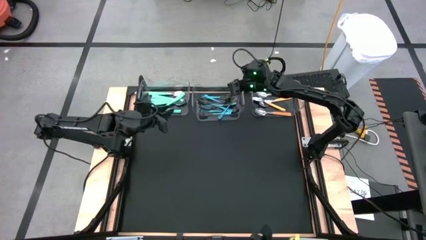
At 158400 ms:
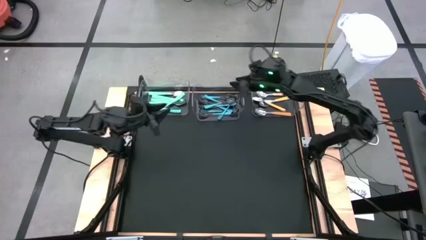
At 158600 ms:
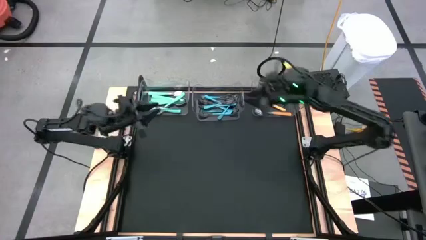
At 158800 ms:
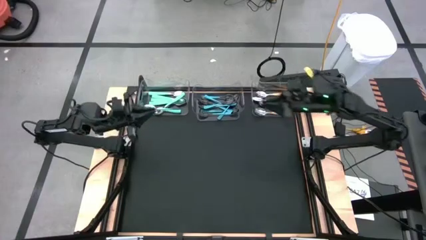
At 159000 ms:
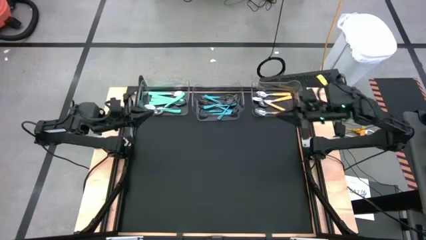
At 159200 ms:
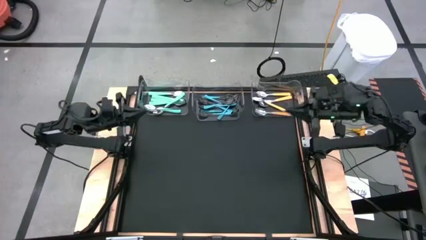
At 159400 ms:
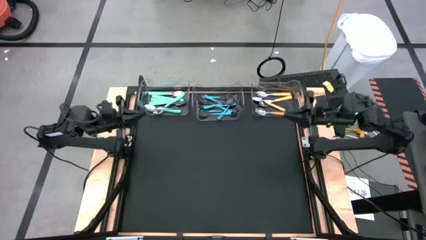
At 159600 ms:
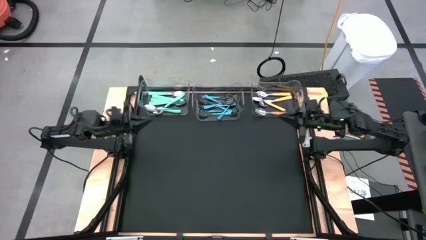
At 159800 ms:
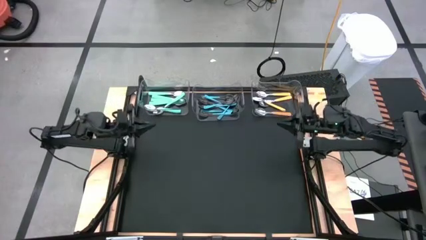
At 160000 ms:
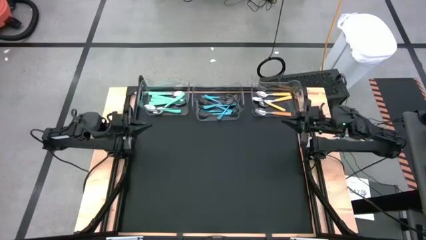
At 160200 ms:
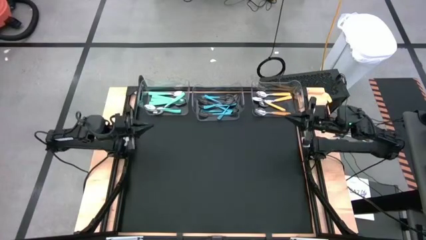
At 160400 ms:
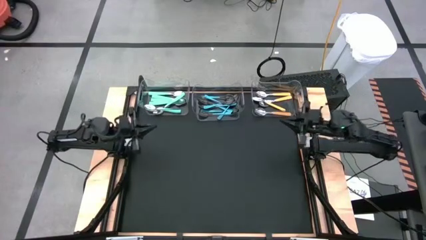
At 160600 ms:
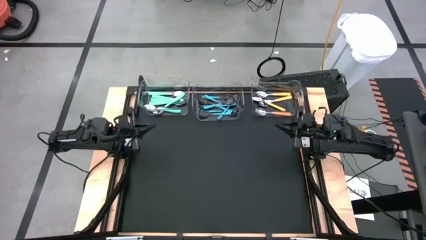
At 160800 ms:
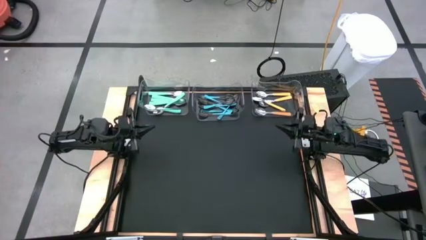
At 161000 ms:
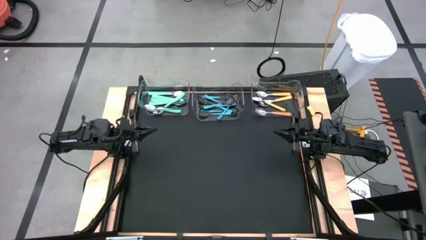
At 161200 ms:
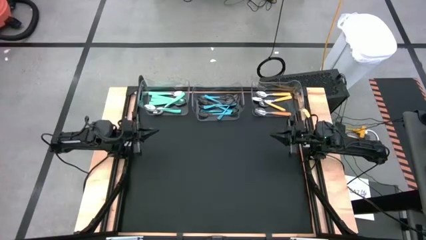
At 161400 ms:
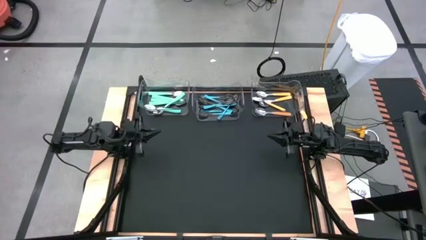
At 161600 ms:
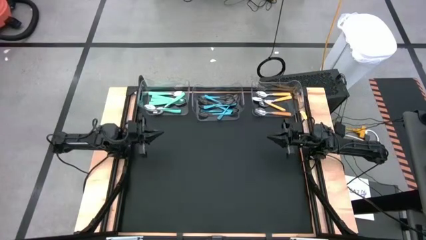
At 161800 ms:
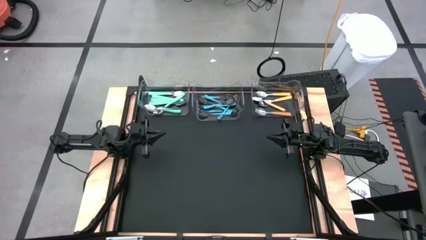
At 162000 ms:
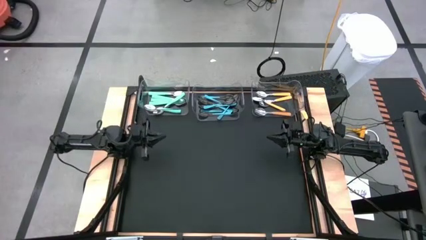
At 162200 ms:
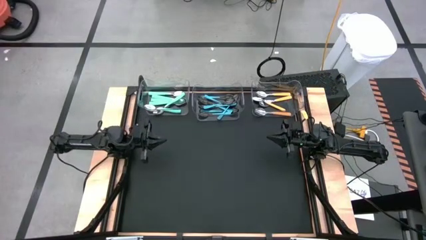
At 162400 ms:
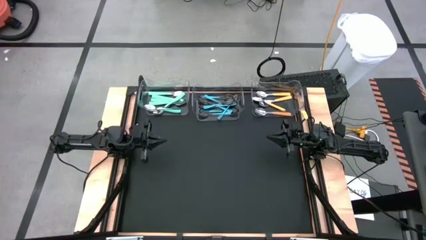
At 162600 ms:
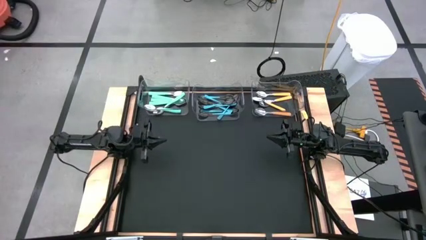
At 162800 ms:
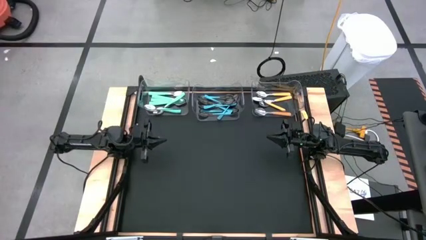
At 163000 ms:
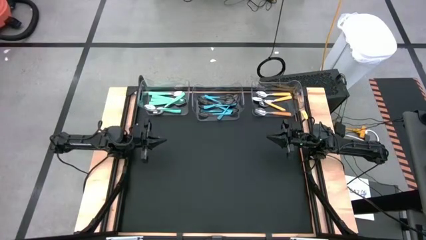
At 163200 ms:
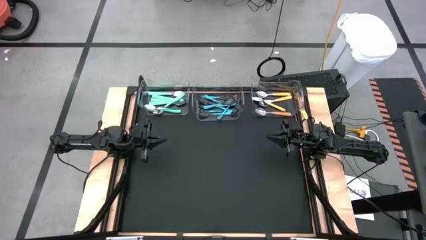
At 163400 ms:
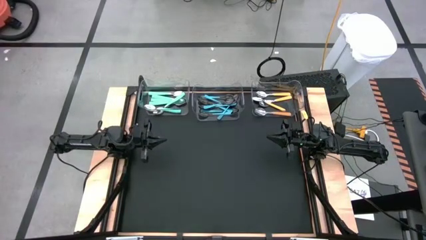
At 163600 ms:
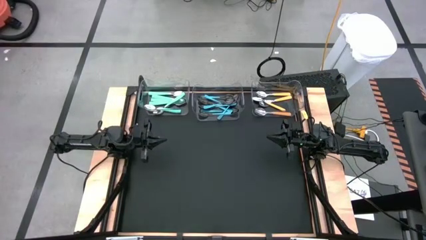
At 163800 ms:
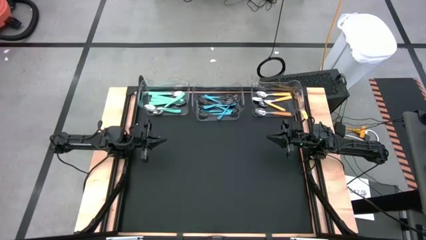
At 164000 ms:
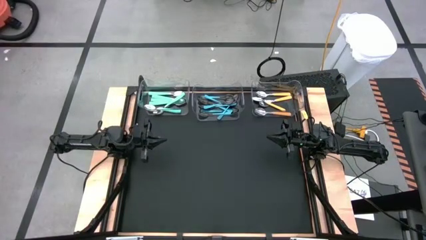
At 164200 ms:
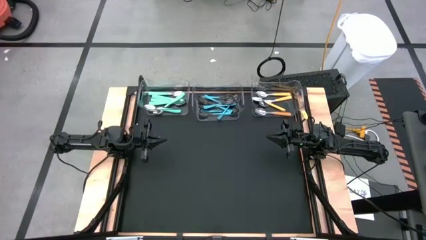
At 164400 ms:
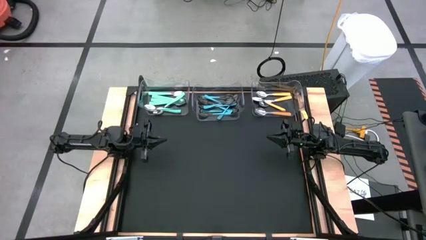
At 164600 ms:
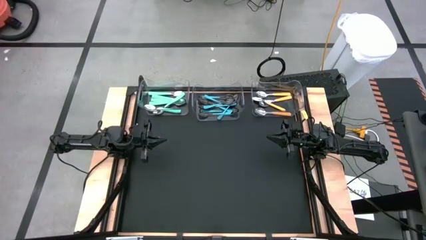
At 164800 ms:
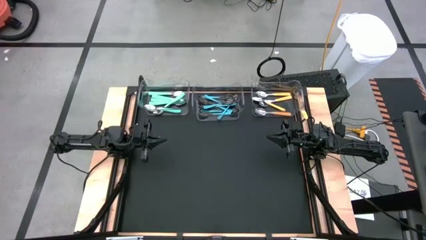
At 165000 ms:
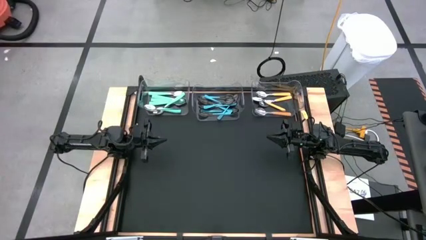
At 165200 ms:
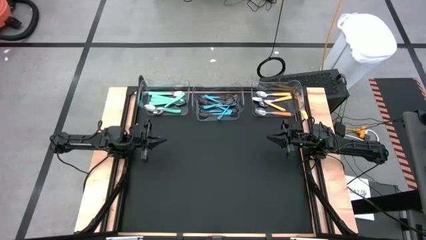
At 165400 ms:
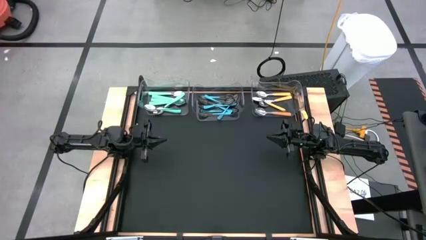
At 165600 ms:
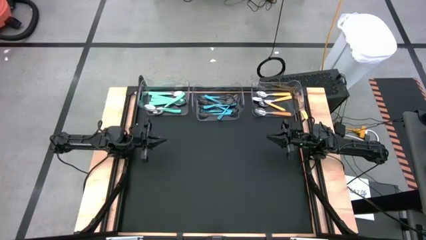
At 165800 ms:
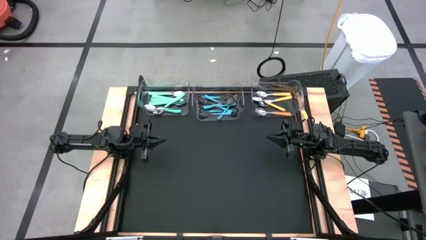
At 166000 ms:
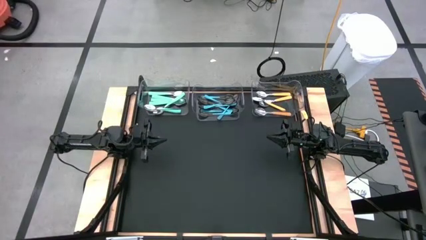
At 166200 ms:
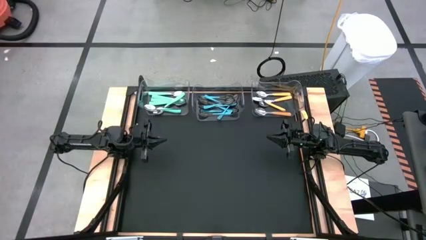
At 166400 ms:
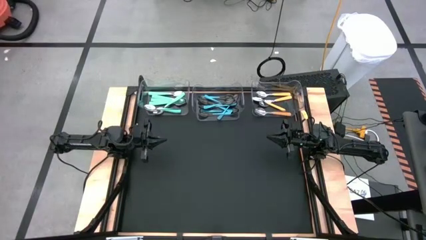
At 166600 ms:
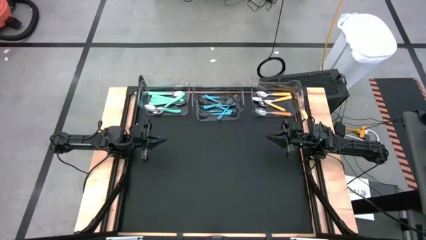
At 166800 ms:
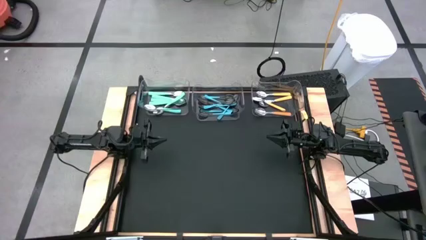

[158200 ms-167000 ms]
Task: Sort silverware by color (type)
Return to Home Position

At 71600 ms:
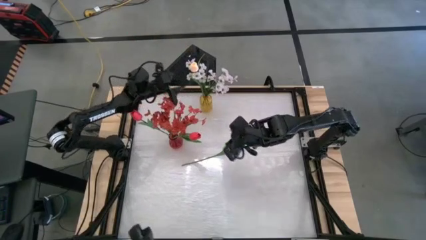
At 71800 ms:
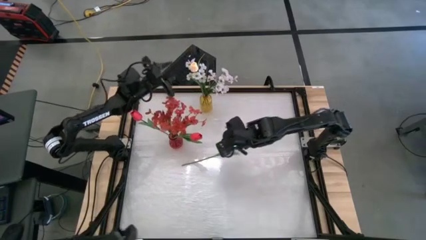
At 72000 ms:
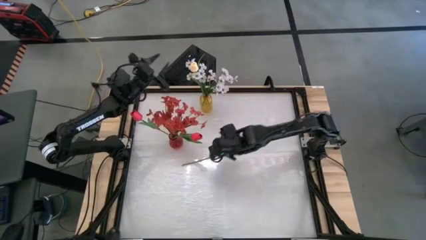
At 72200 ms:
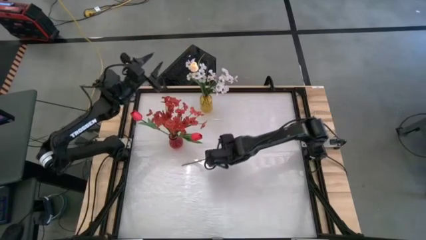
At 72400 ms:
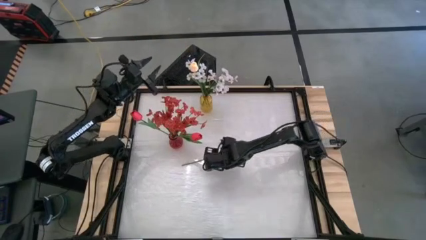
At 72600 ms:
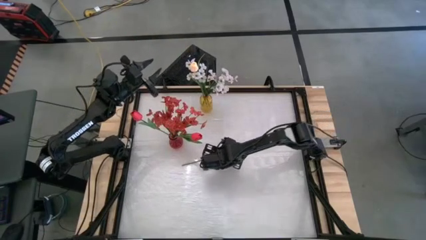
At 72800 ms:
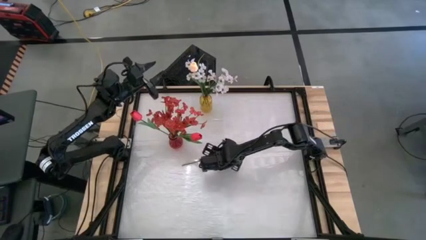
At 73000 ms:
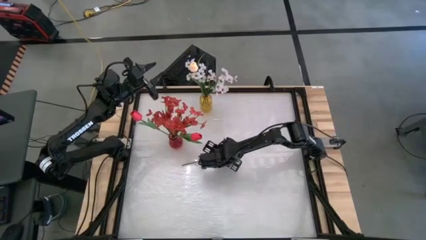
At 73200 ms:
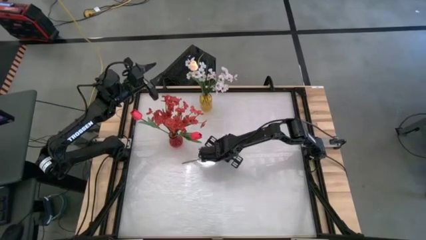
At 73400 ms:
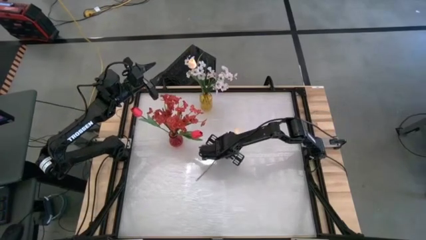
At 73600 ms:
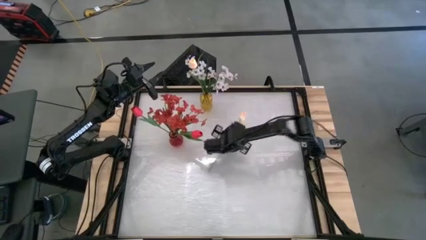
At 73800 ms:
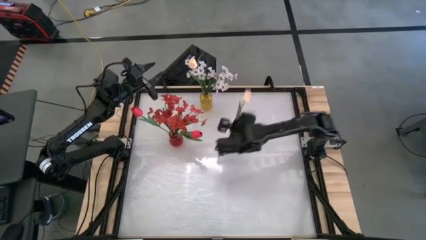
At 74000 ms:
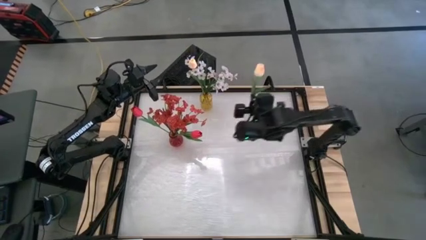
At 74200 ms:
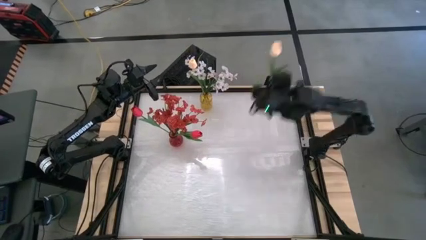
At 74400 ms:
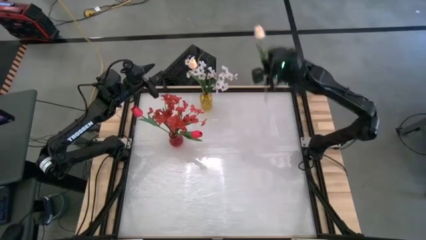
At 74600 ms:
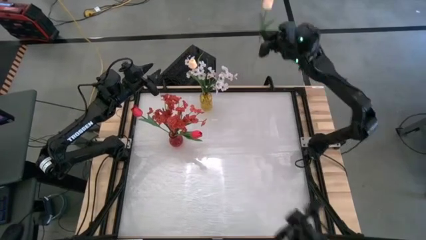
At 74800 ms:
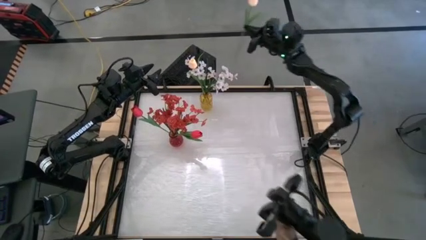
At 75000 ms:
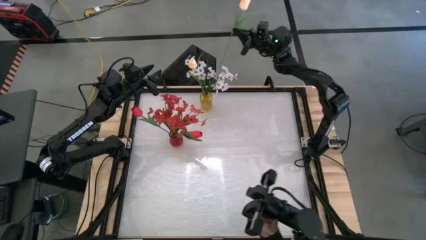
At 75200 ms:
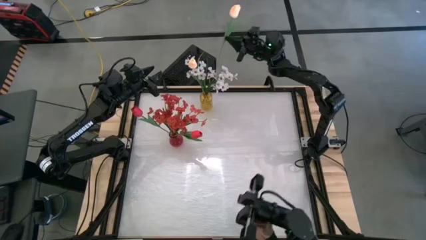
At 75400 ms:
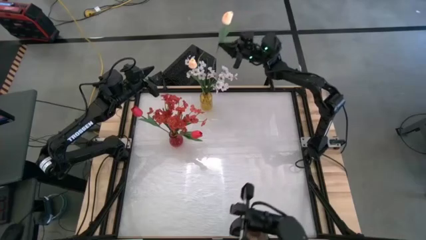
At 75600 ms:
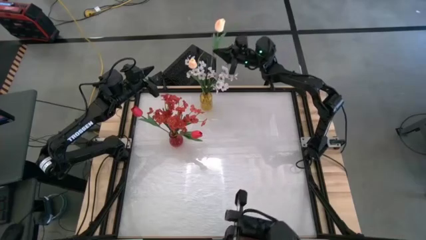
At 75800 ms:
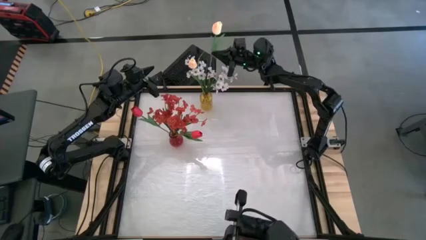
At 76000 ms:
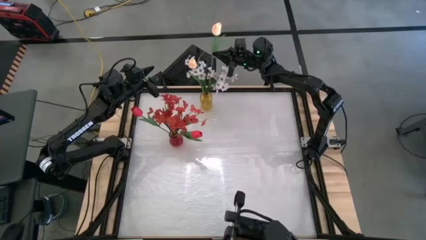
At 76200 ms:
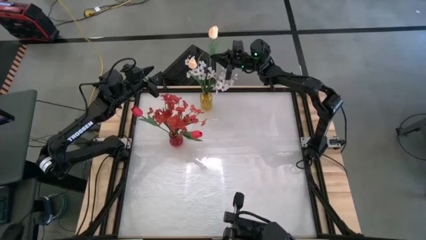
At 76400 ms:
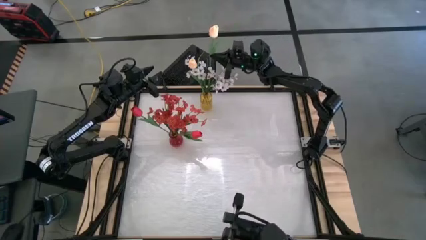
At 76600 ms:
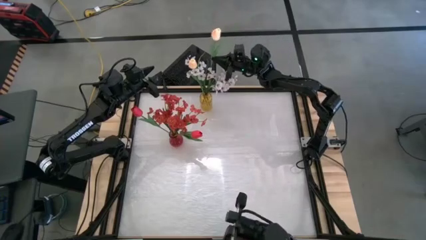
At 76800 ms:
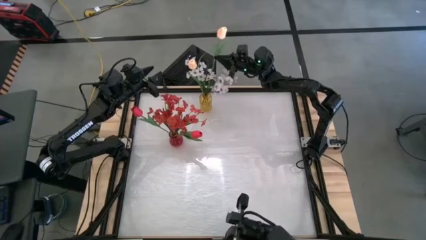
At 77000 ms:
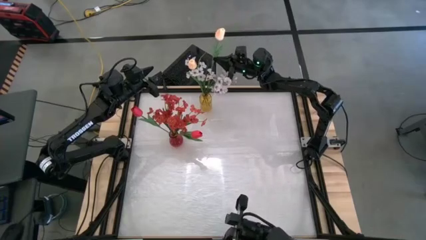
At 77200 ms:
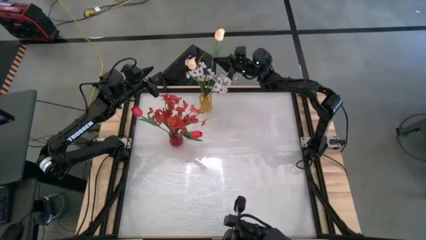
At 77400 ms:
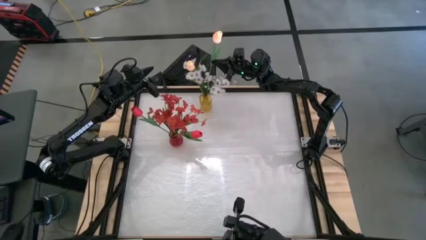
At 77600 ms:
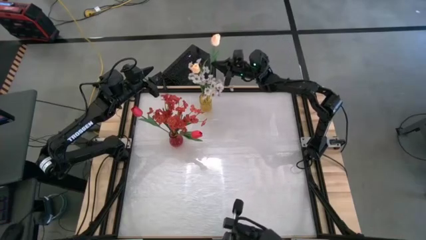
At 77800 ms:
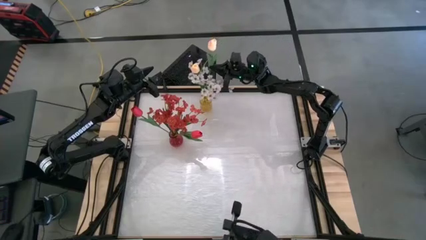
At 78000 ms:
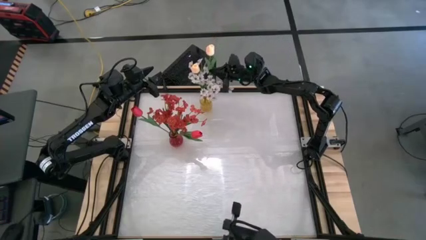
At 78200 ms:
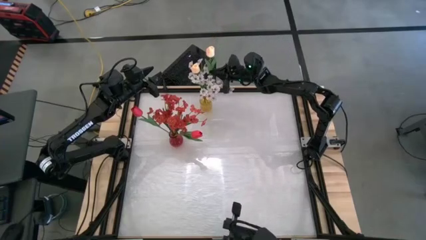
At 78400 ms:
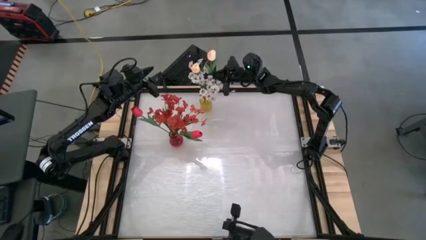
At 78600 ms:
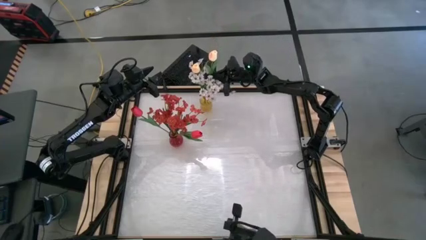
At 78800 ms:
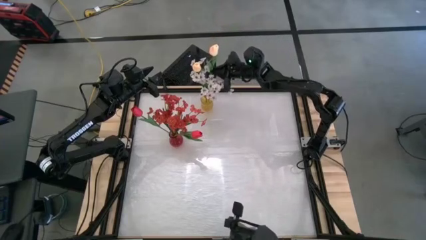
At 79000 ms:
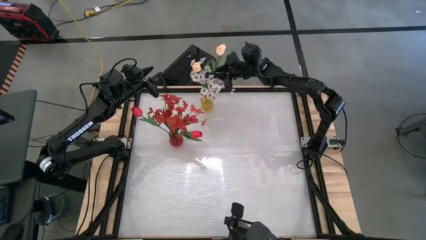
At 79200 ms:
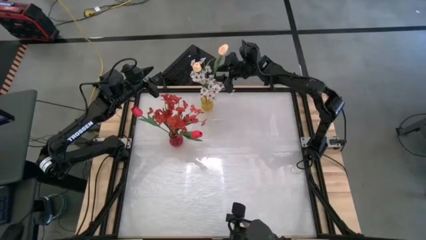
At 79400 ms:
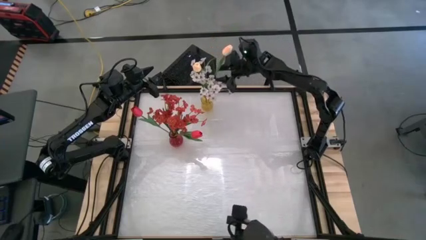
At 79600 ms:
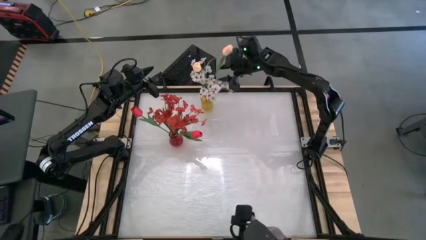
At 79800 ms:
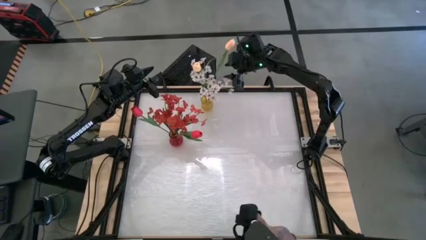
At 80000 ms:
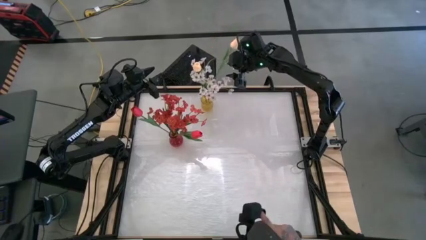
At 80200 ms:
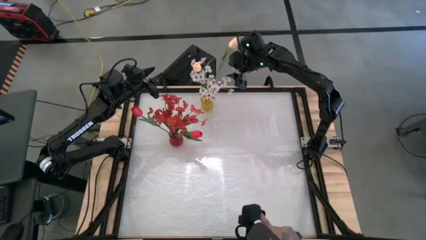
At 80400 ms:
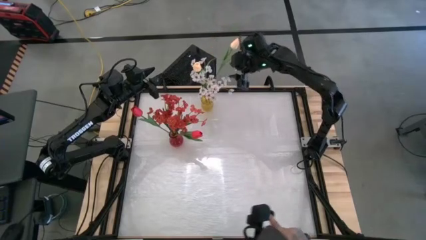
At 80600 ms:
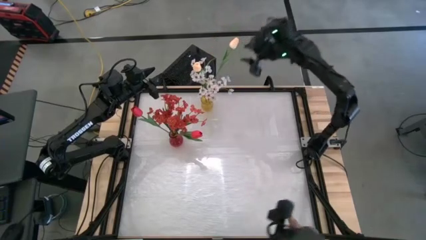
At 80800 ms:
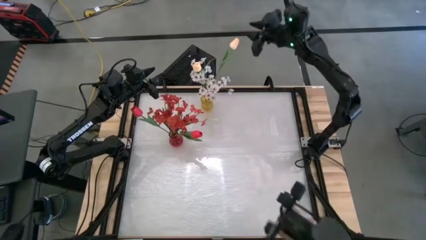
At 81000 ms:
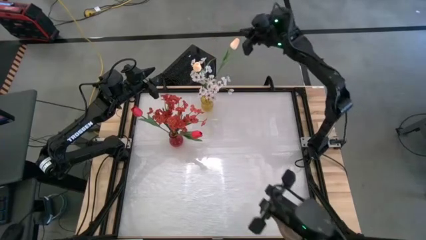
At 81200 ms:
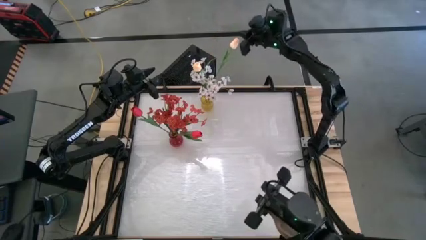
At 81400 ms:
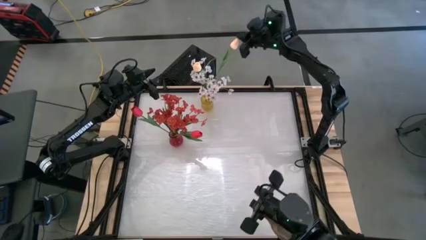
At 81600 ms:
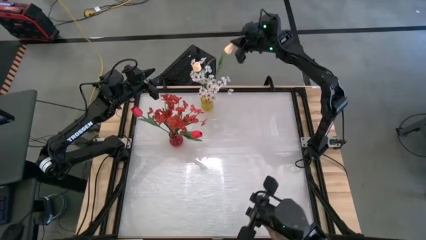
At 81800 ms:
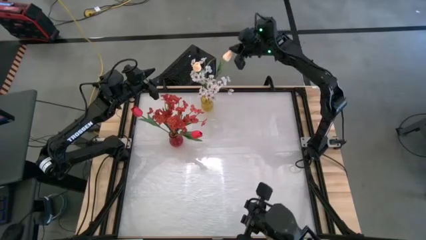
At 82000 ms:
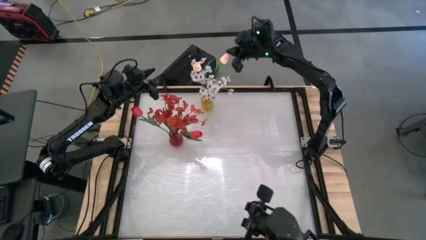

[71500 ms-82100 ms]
Task: Sort flowers into vase by color
Put the red tulip into the yellow flower vase
